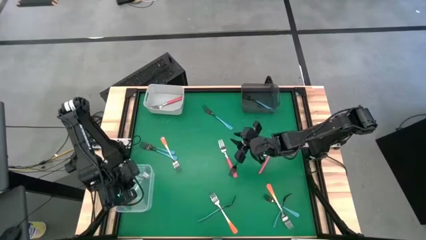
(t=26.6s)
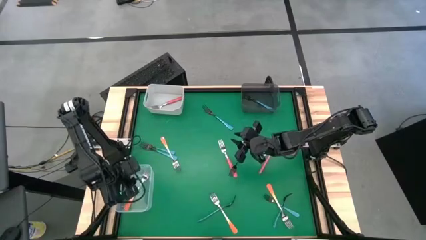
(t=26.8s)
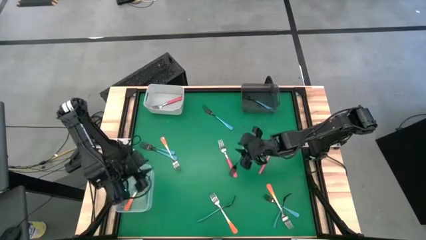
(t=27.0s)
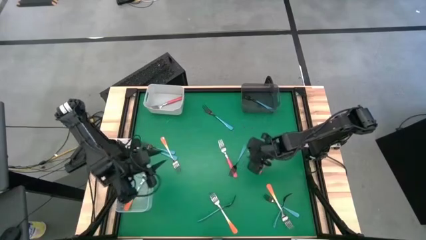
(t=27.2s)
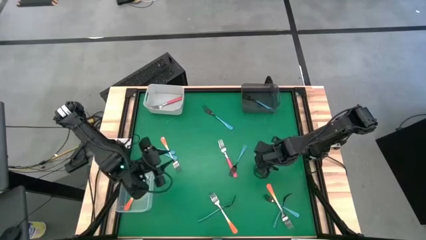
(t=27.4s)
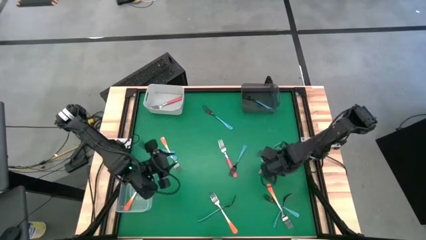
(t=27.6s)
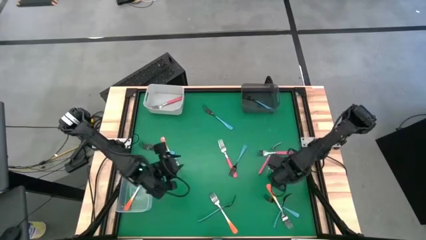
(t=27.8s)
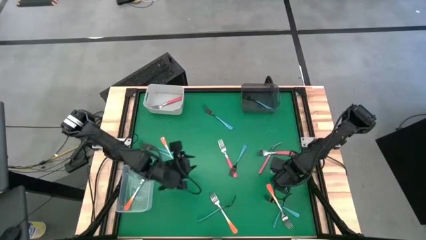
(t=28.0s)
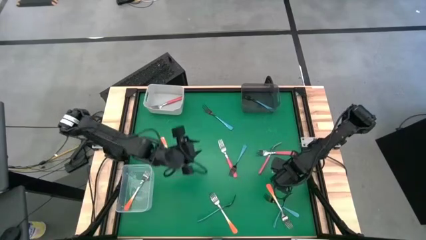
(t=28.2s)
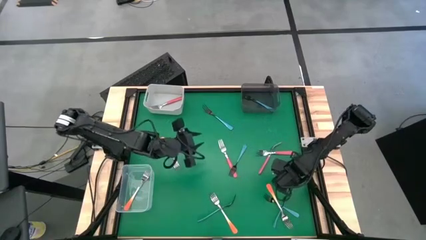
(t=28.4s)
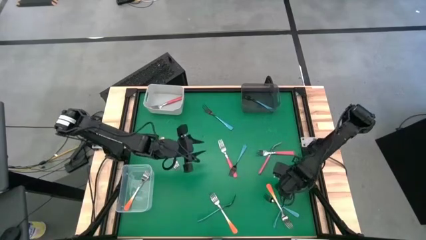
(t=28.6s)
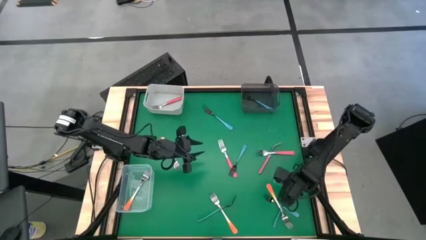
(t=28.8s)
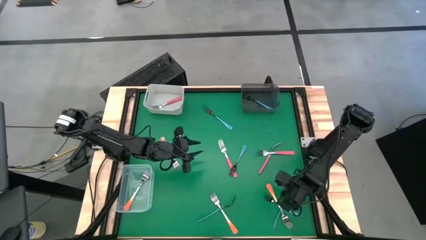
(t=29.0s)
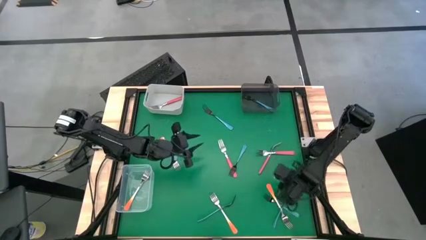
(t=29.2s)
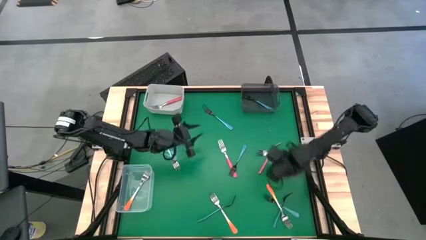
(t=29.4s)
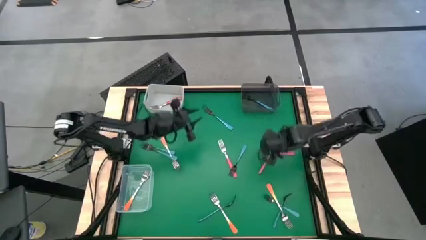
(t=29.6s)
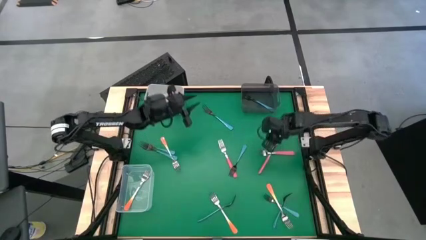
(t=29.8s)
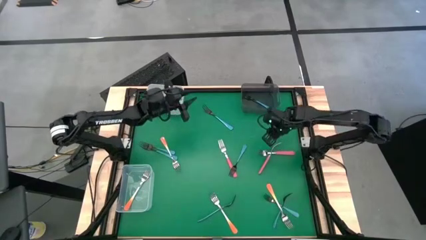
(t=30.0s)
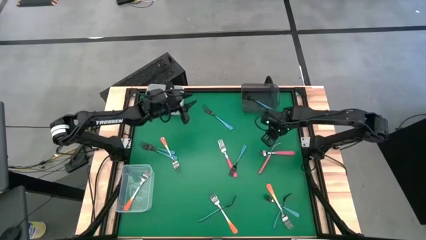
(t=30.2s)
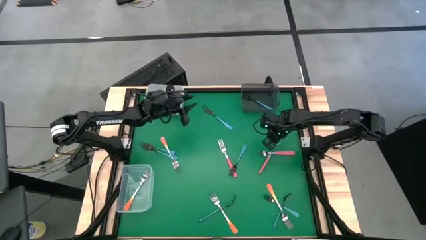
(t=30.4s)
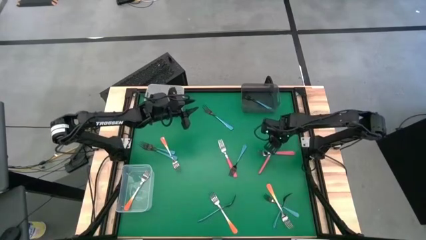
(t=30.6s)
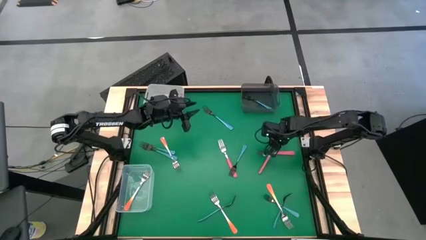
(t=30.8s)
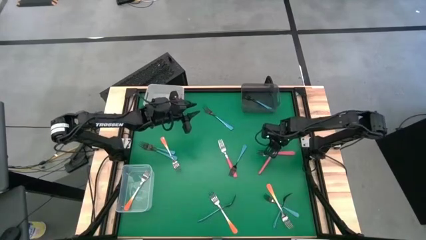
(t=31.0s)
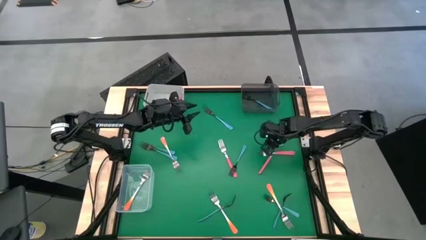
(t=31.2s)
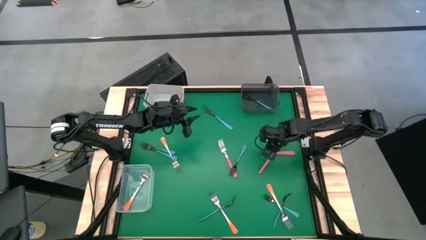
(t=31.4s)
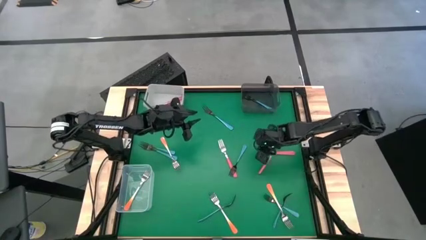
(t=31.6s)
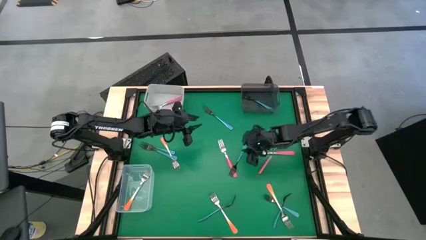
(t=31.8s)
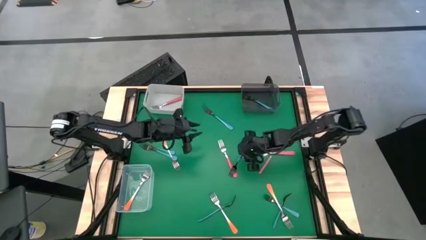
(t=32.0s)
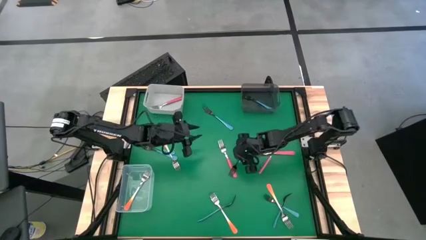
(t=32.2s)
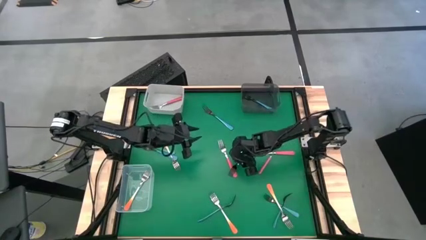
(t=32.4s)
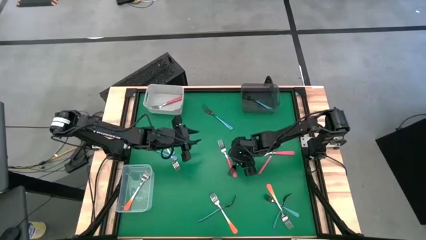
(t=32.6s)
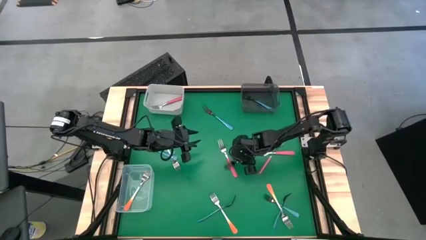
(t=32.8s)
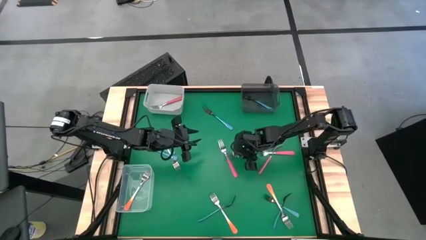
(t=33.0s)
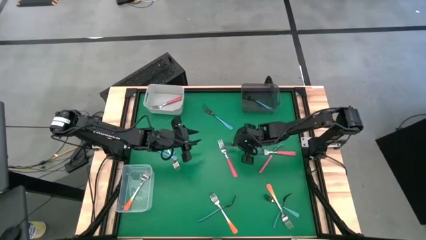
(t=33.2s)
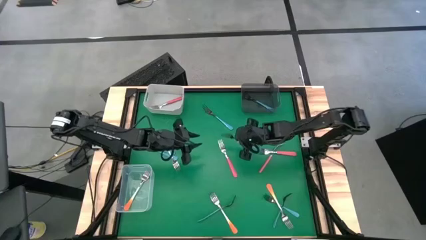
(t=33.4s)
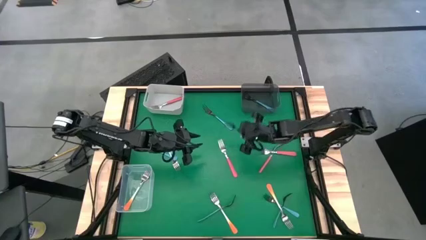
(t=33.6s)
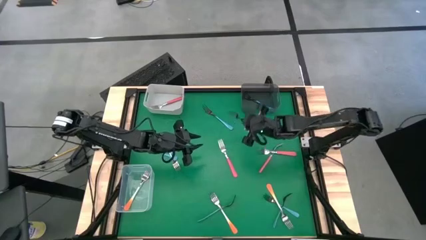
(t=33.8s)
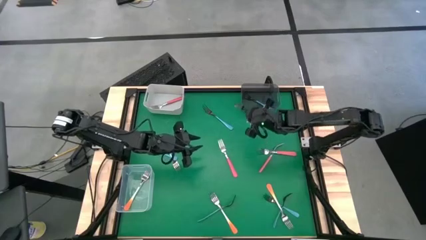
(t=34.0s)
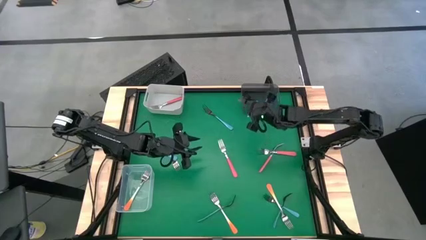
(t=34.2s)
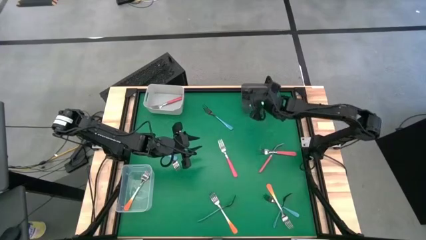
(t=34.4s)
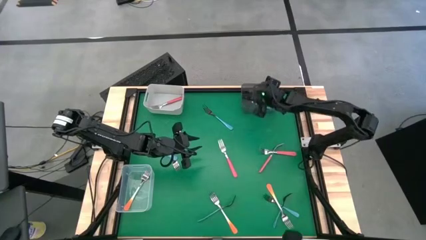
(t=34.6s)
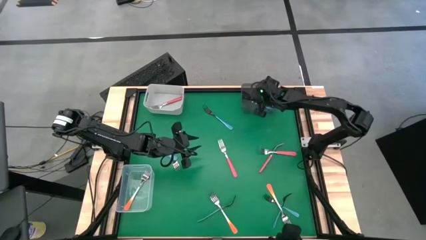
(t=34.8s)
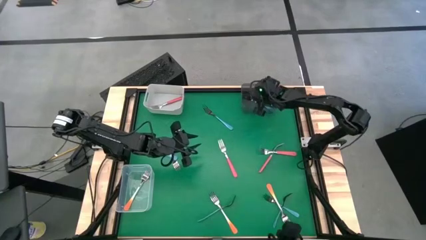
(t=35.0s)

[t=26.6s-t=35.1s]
Task: Sort silverware by color (type)
Put the blue fork into the black bin

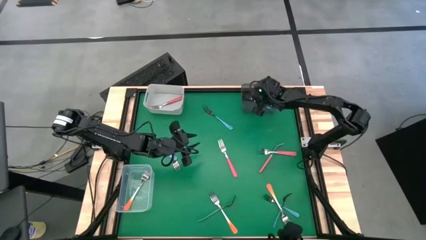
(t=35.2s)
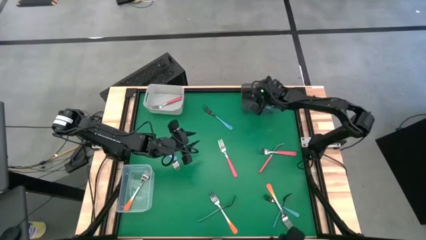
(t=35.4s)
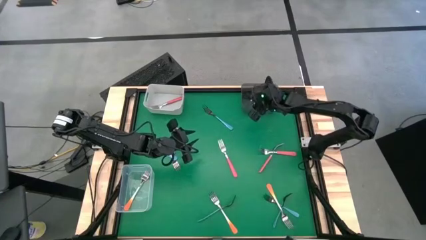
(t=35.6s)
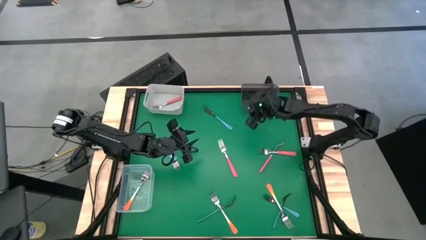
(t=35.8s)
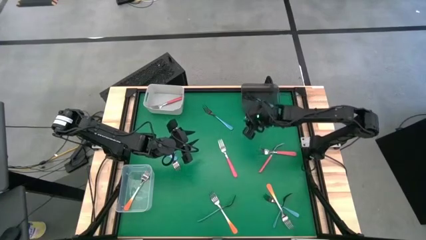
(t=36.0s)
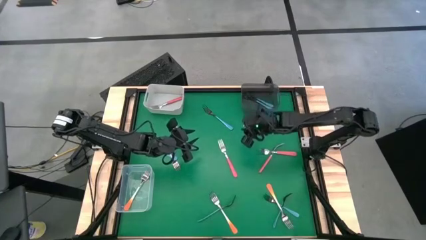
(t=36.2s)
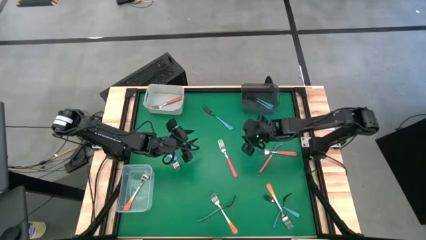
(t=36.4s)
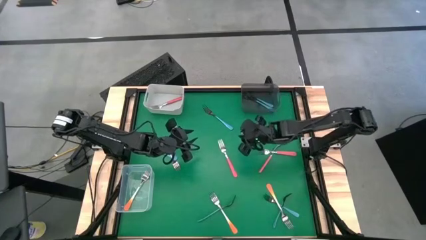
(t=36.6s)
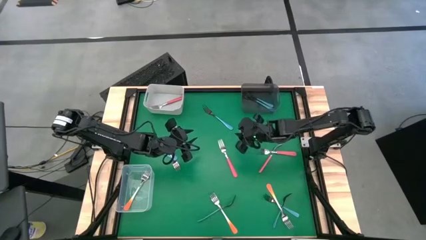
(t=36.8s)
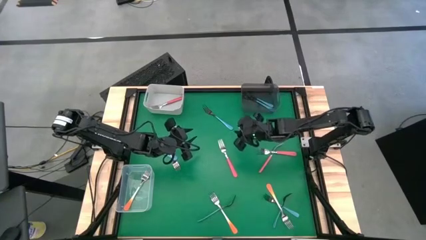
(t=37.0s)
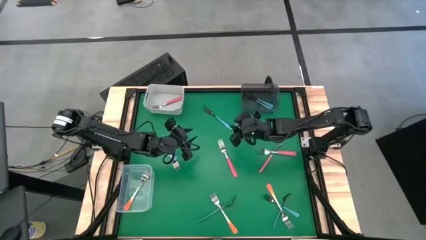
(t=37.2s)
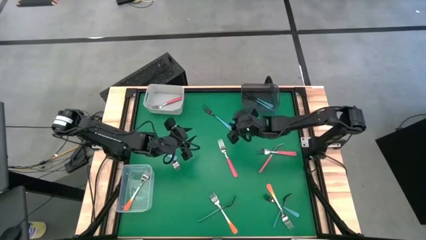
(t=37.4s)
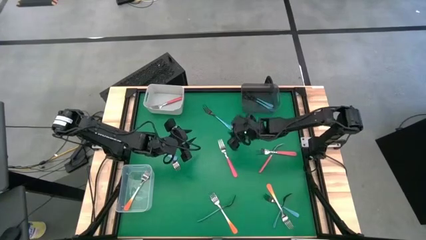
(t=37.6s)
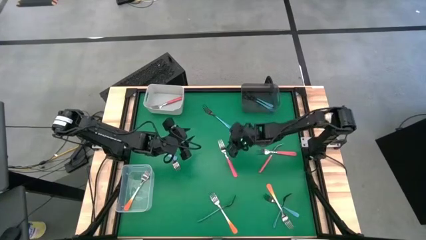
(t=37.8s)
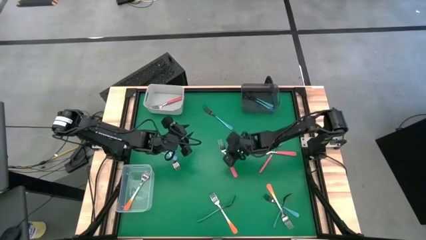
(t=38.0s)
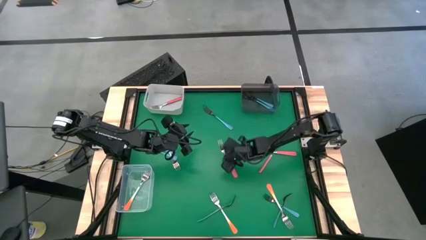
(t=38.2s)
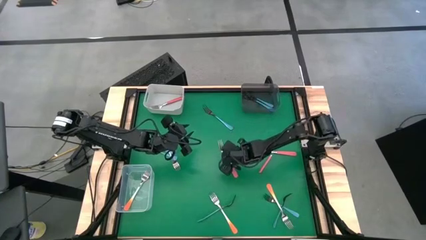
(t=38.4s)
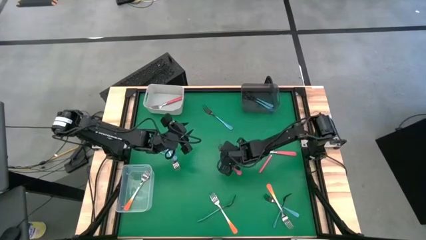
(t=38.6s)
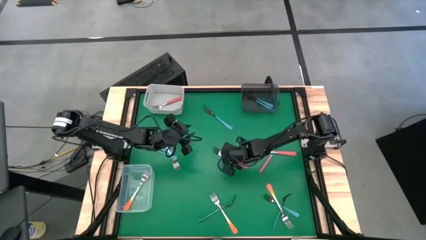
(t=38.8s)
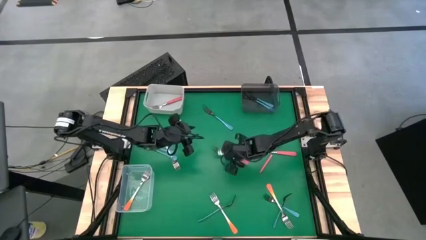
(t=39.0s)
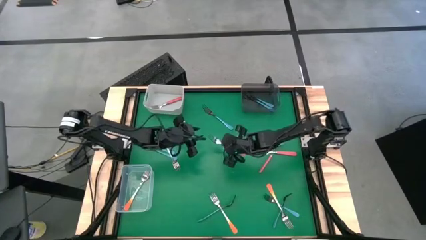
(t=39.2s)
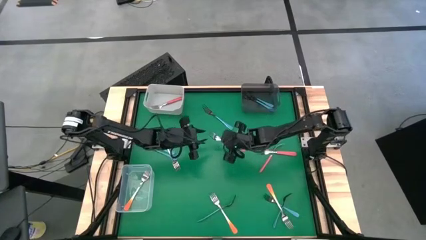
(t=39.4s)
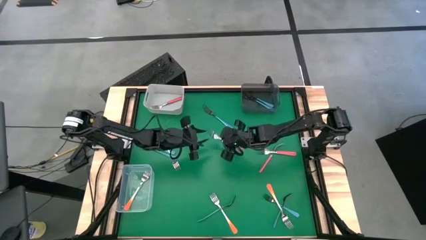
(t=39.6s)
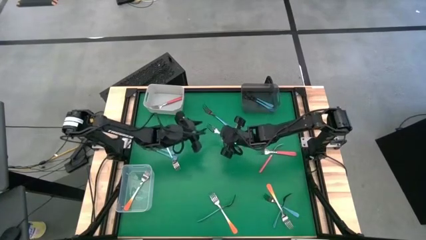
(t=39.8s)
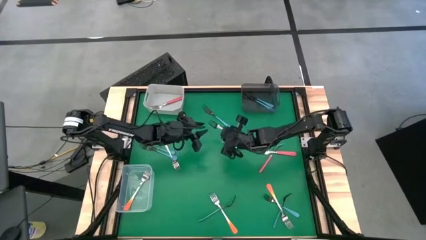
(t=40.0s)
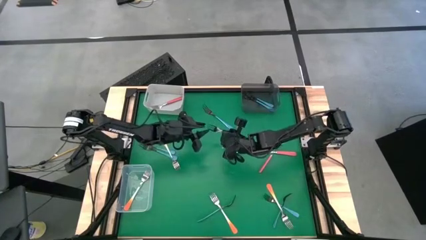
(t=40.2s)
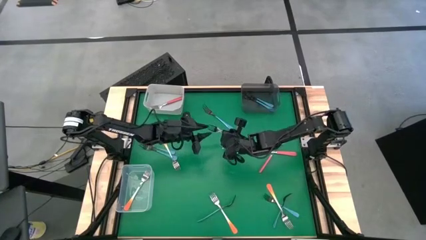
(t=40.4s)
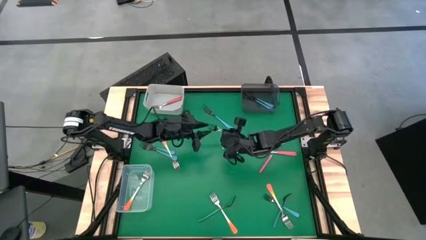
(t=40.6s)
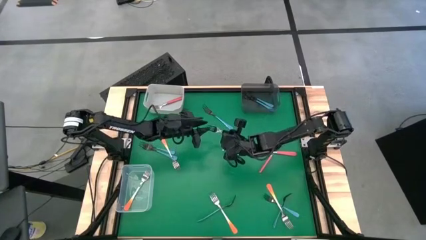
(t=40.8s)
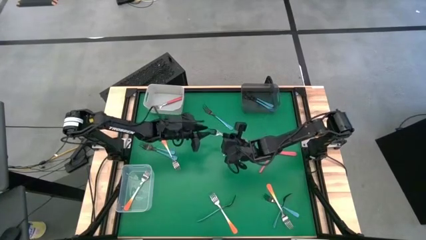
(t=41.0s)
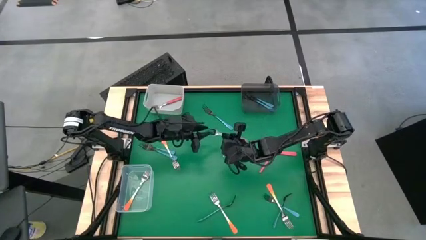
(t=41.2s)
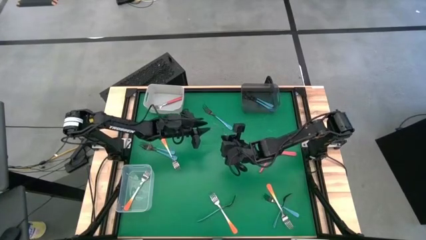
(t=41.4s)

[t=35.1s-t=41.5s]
Put the pink fork into the white bin

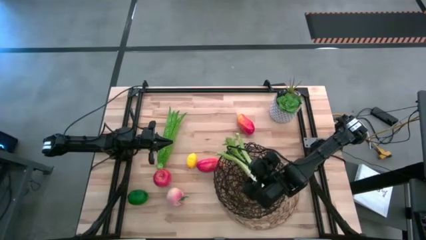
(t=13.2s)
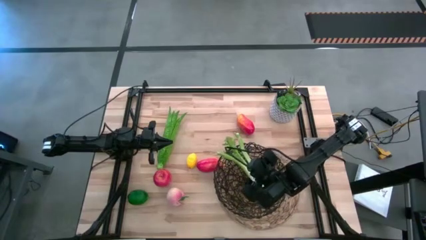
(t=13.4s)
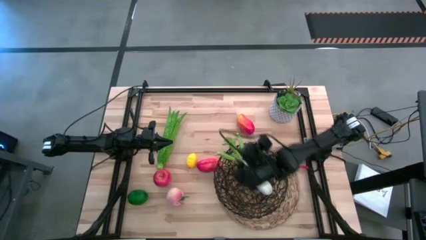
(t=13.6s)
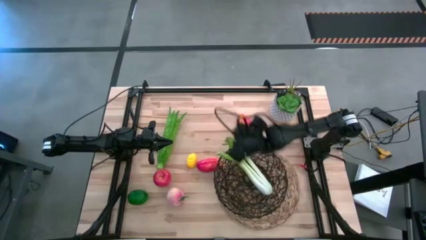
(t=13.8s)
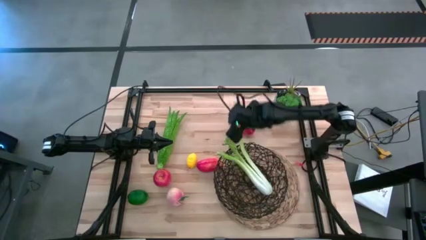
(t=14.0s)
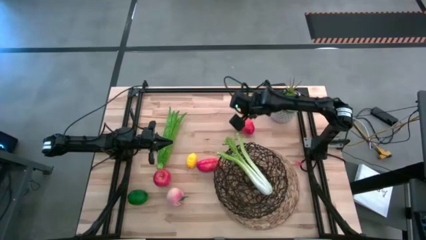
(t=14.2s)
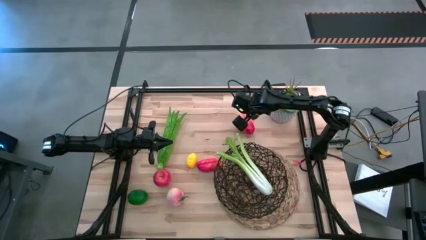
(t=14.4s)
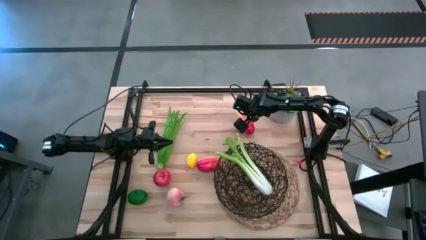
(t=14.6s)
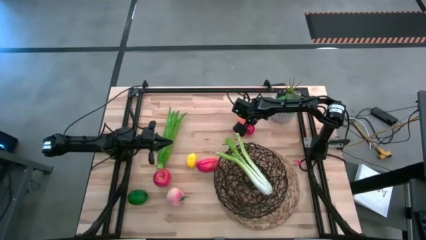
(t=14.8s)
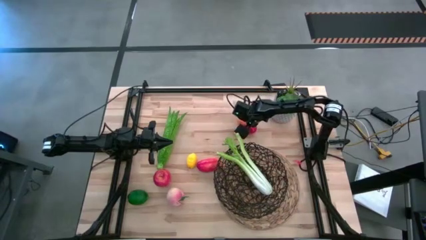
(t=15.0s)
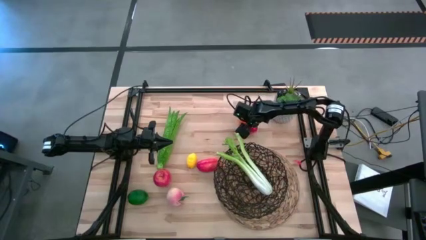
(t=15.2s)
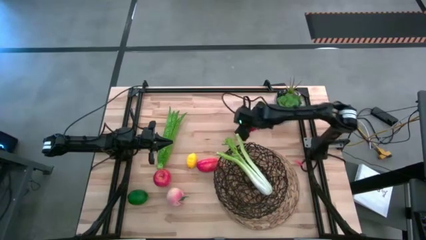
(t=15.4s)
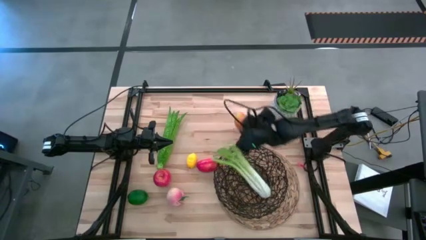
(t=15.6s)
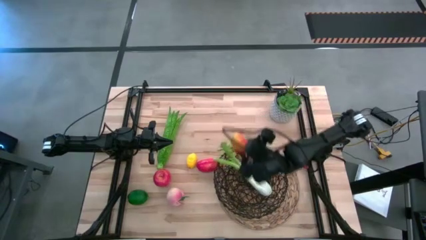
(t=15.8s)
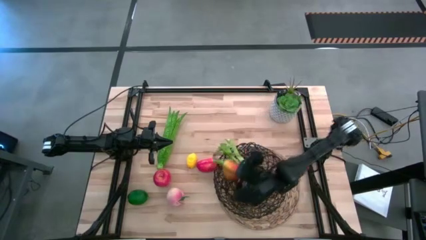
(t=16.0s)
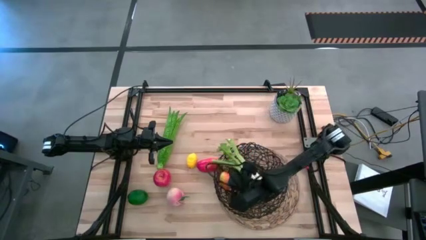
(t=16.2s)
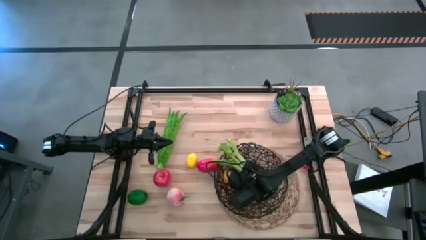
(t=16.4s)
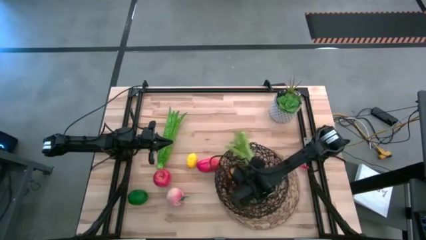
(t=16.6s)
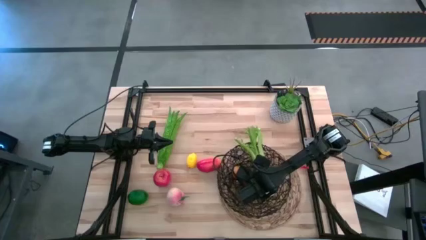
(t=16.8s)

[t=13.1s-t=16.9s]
Task: Build produce basket
Put the top red mango into the wire basket
